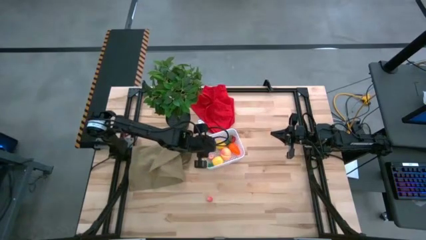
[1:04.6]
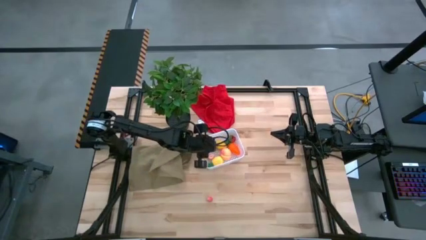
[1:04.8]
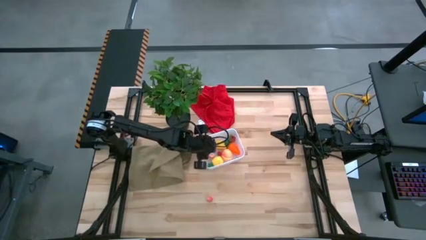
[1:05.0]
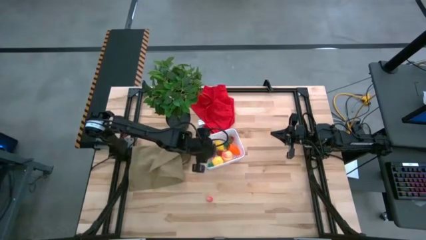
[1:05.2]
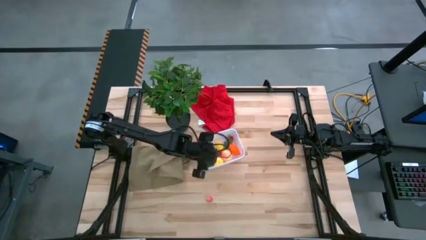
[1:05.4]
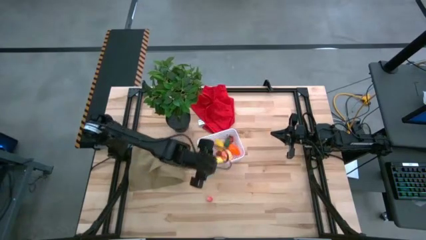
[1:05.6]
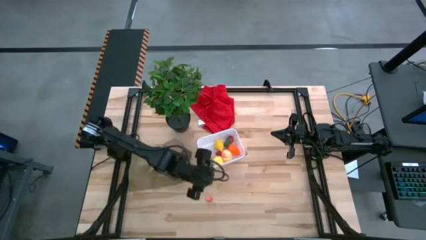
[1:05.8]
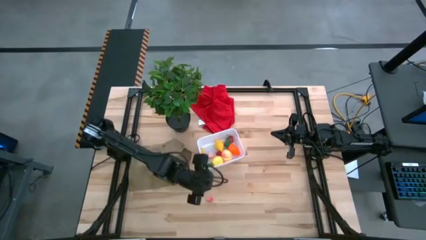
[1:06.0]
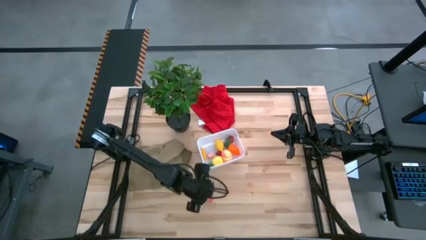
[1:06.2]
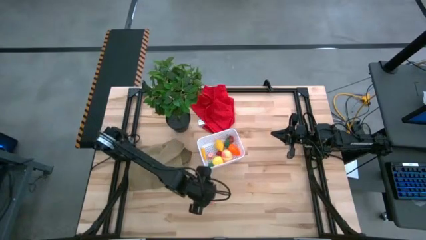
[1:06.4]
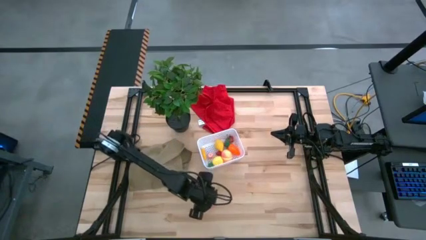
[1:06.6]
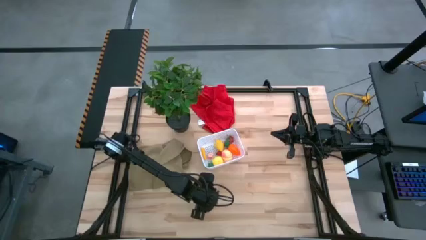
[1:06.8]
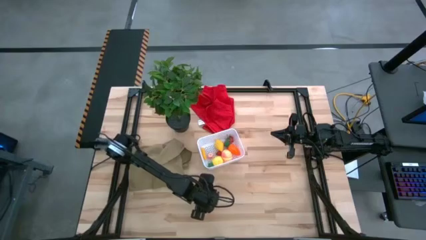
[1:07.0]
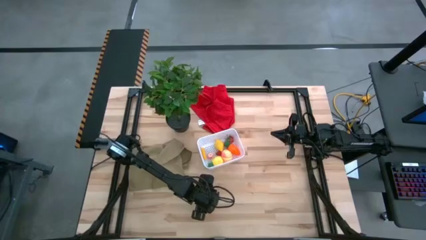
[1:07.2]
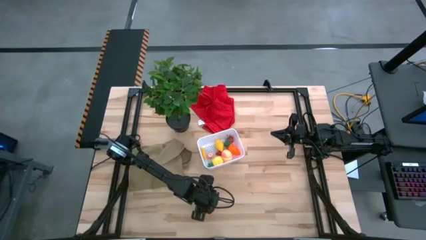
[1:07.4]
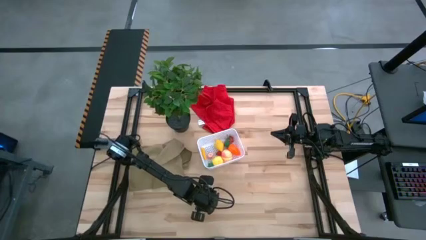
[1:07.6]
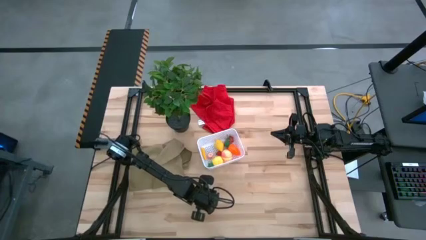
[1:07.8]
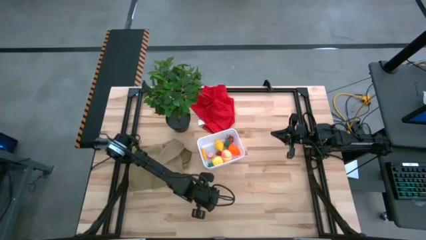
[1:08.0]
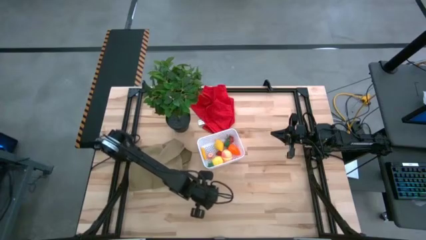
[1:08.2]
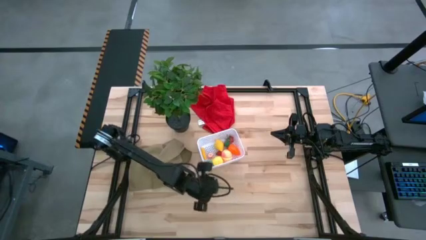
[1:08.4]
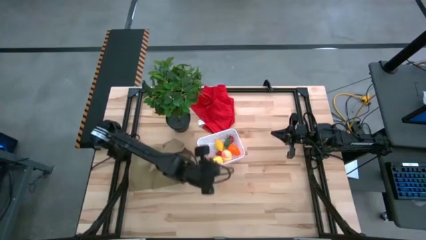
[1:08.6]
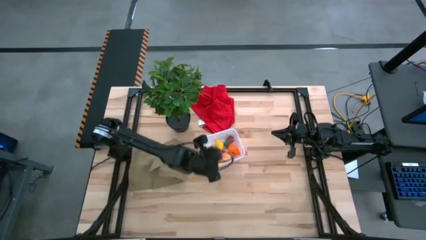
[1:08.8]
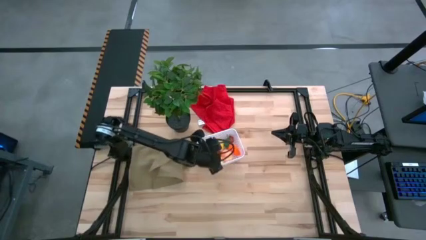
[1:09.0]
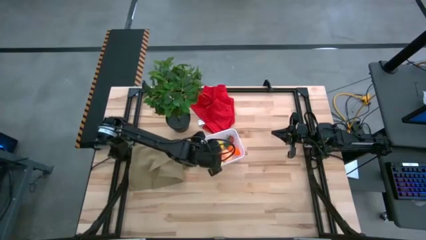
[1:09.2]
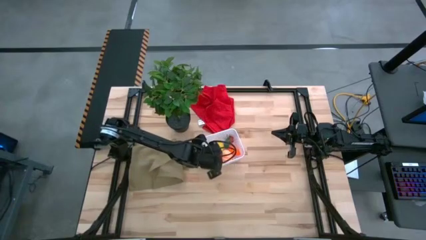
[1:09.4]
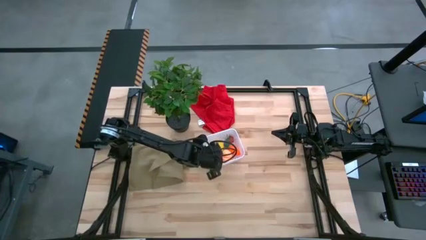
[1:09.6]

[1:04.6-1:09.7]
Task: Pick and placing Produce into tupperware
Put the orange apricot into the bin

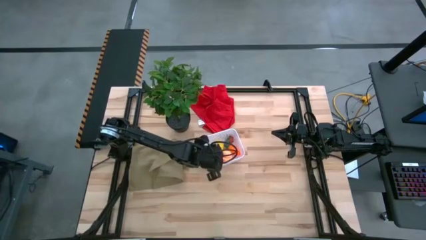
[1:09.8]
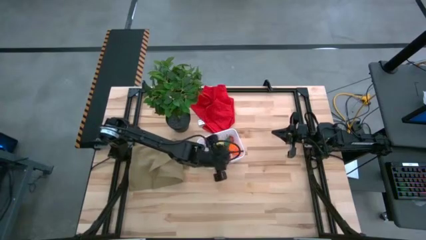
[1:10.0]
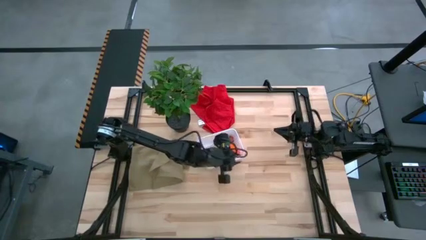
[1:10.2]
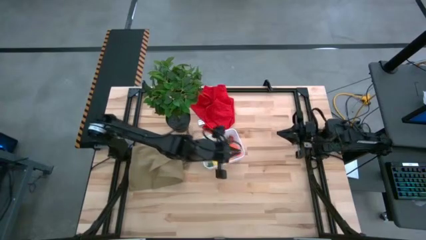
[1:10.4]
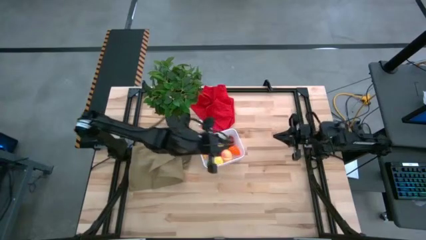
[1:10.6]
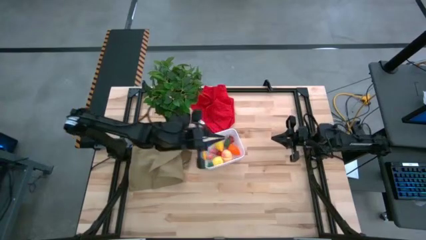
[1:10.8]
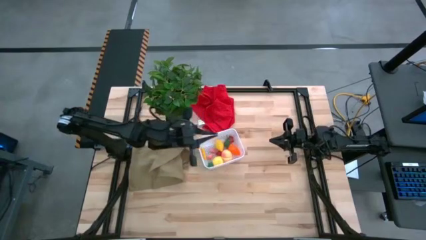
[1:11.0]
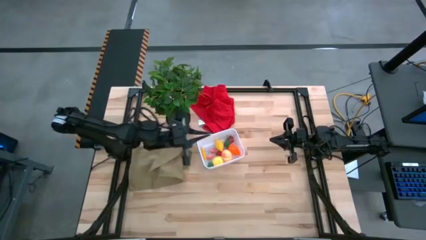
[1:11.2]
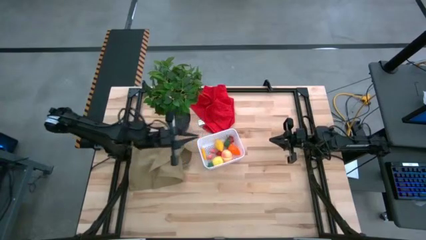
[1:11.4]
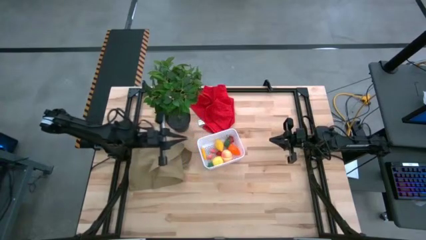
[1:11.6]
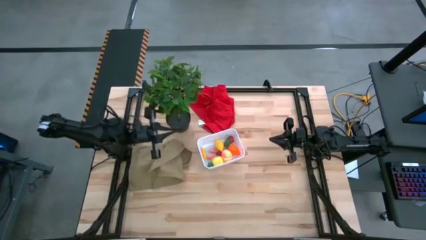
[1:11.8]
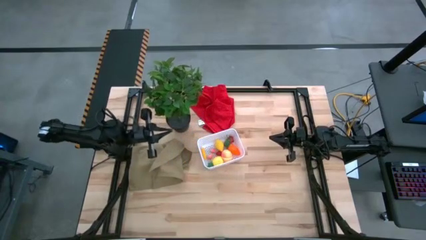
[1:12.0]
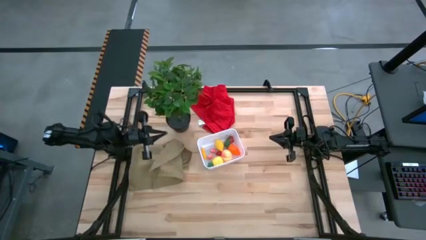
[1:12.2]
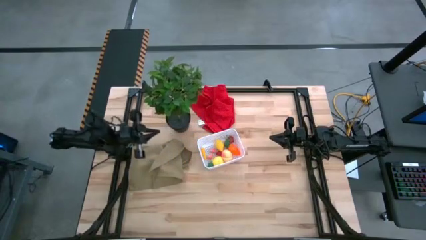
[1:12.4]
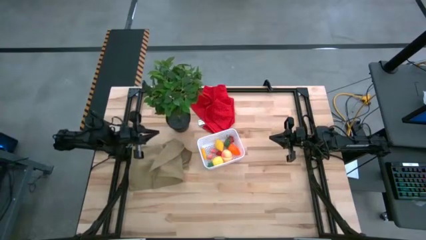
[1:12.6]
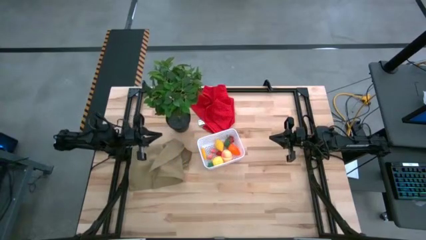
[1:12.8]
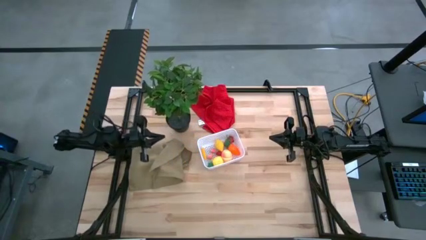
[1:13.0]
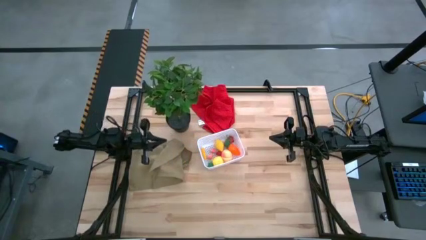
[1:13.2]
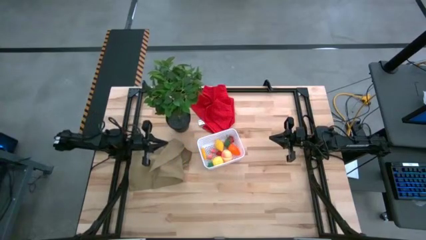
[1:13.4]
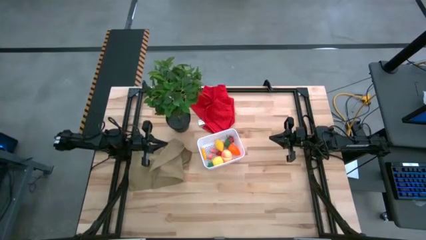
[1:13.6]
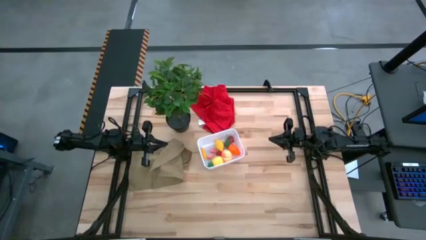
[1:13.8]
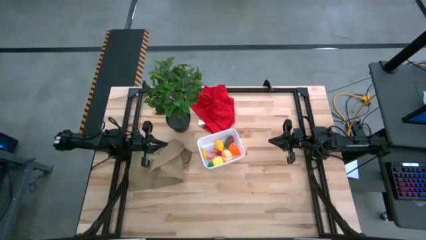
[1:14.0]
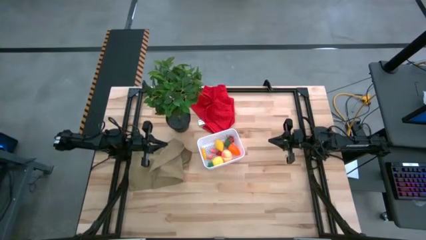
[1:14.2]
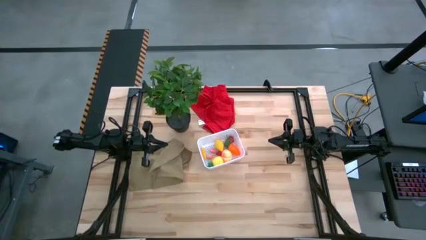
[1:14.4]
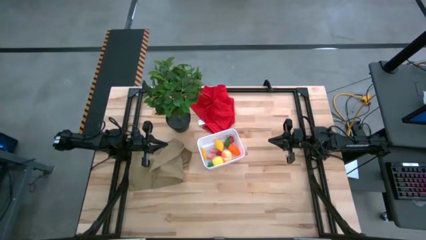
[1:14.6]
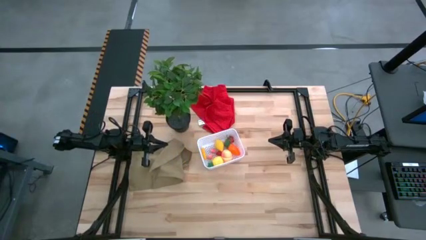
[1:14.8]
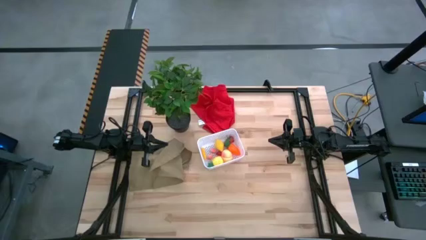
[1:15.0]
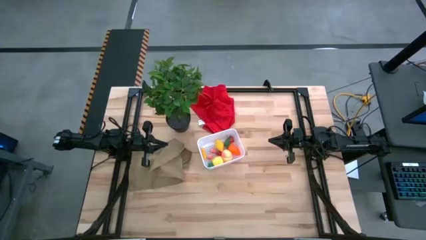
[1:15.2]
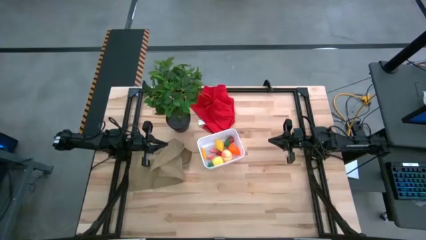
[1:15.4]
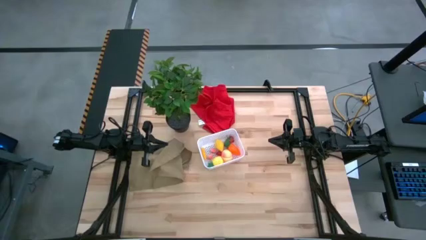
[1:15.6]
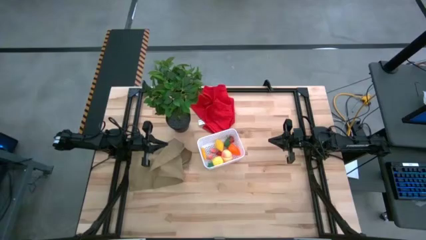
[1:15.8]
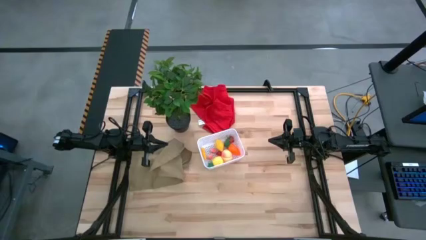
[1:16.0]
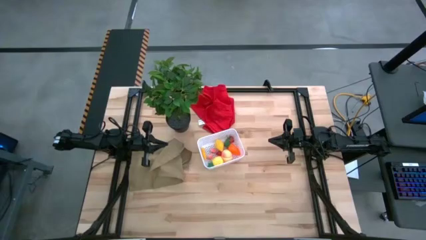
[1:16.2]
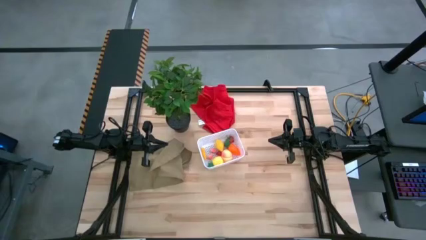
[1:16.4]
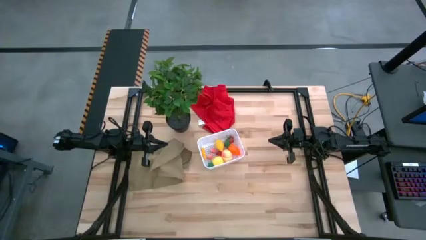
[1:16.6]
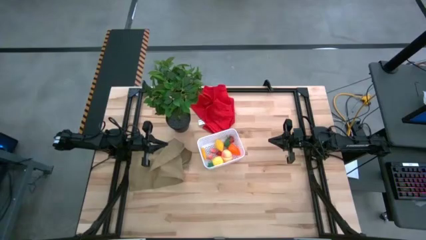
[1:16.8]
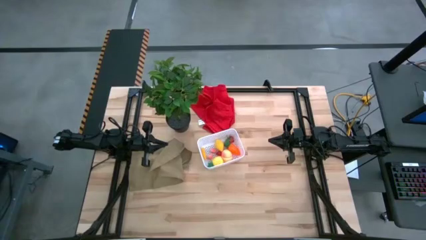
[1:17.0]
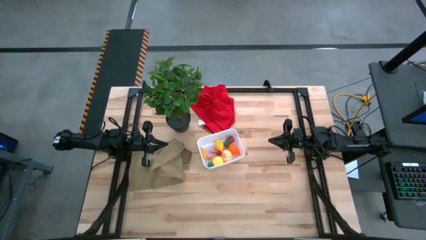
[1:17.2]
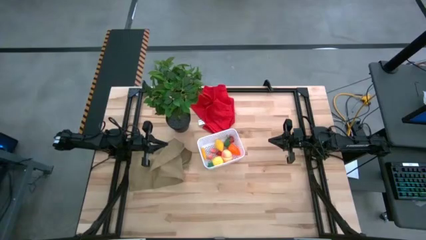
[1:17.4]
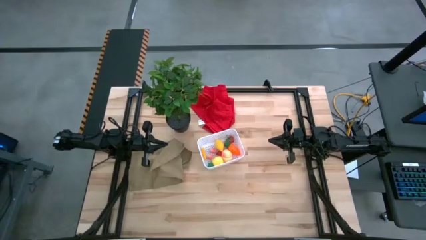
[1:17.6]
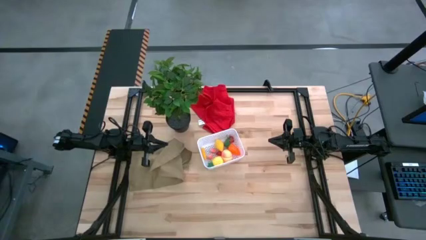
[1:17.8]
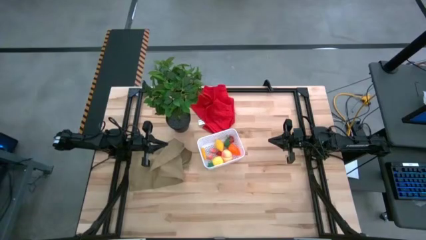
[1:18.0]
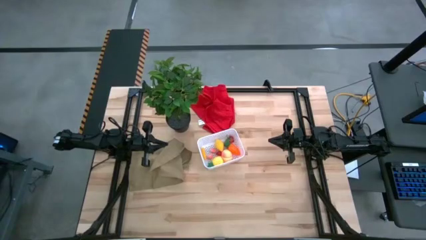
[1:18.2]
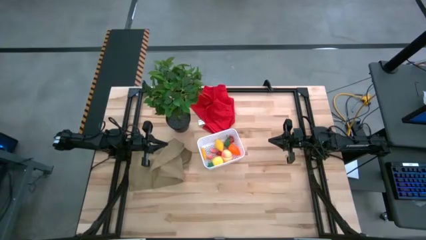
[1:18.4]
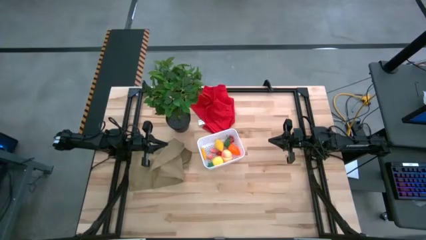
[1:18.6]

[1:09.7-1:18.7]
Return to Home Position

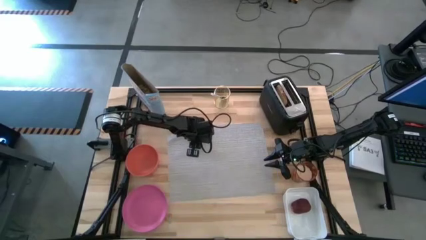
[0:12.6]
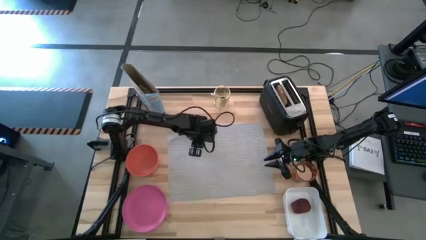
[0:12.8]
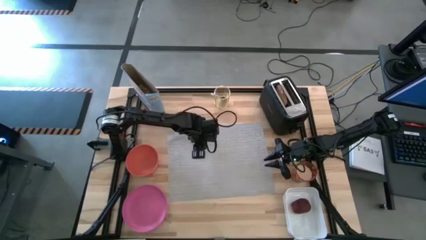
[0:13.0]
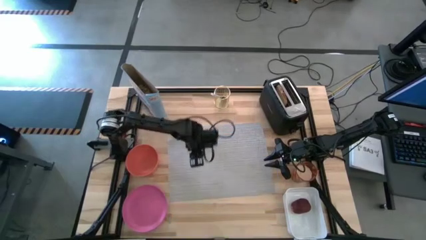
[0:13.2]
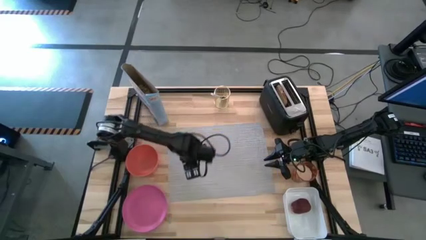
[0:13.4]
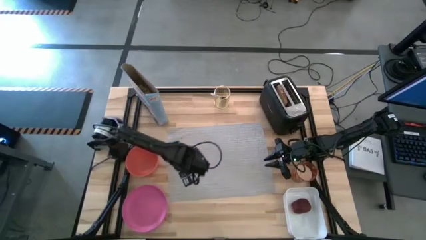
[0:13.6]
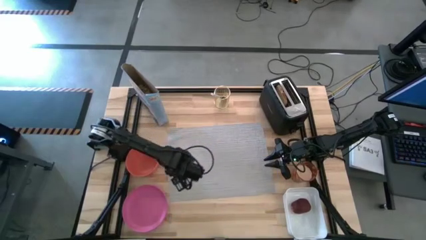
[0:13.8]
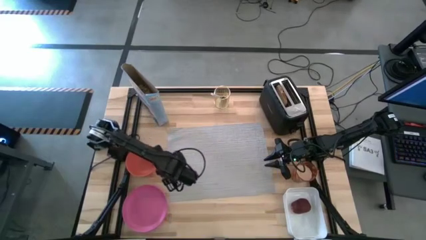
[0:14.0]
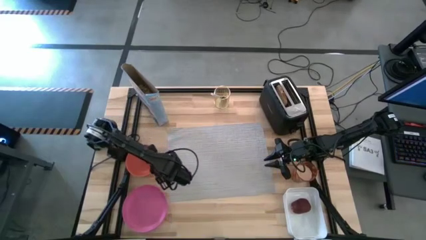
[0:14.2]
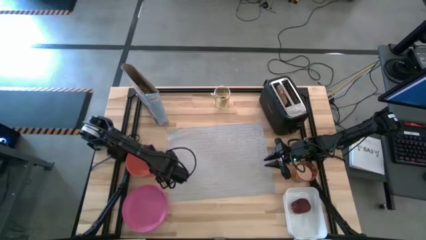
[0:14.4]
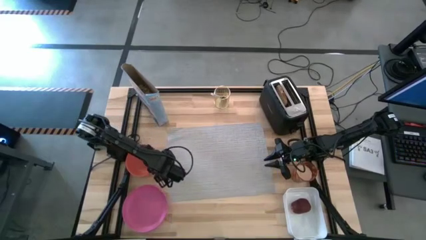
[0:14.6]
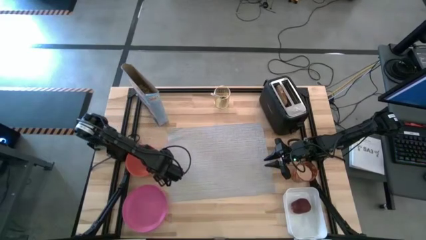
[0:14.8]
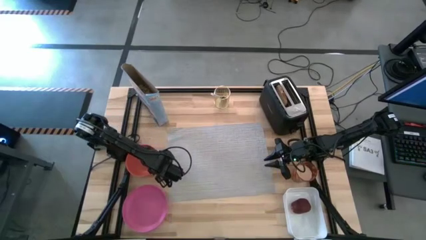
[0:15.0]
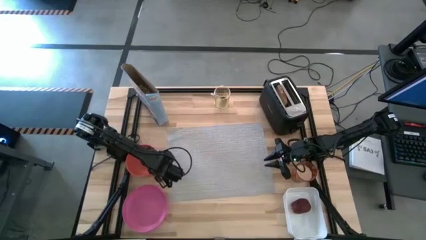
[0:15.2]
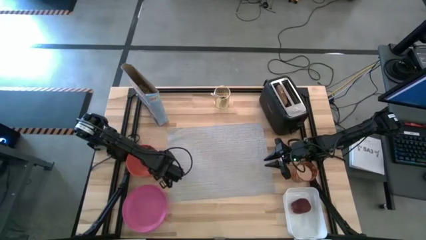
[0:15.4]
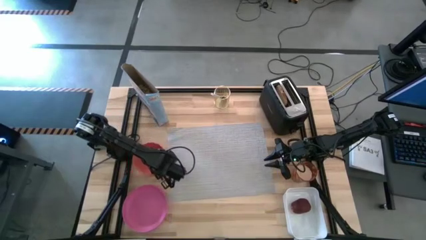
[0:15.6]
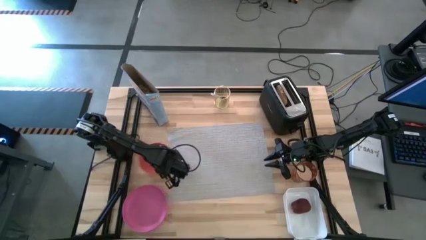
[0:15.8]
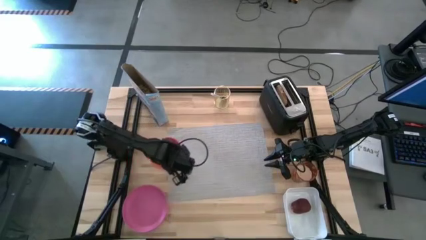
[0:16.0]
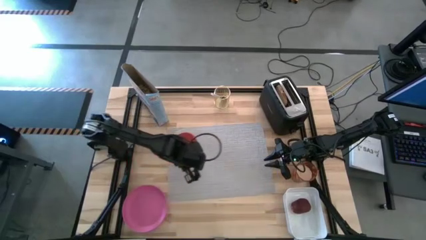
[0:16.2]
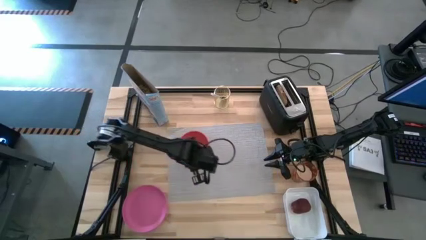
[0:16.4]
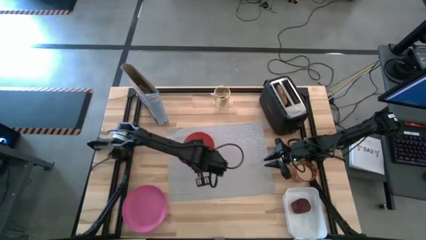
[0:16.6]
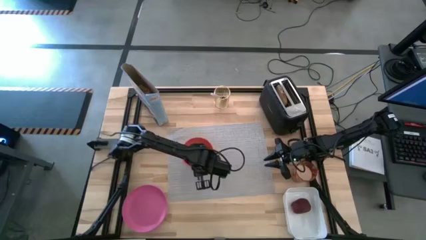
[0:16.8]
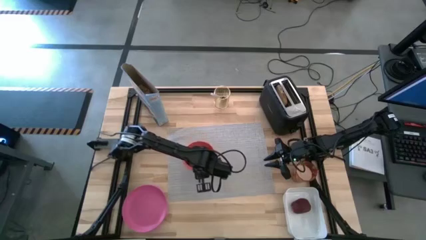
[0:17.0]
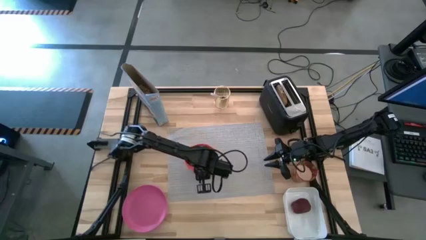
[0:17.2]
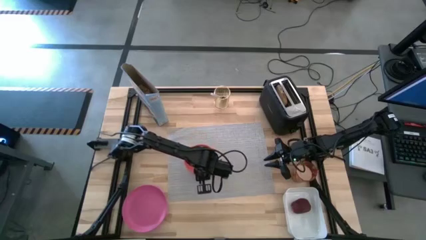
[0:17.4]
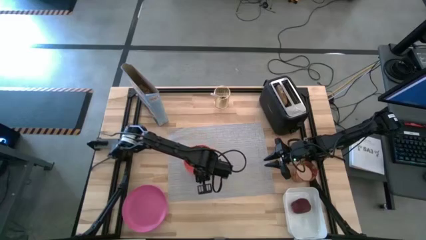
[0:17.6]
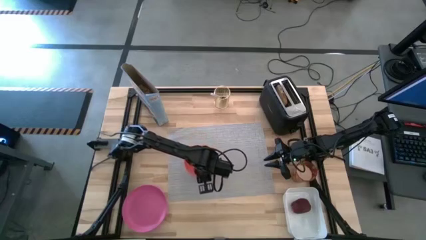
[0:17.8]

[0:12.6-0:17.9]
Task: Arrange a breakfast setting
Put the orange bowl on the gray table mat
